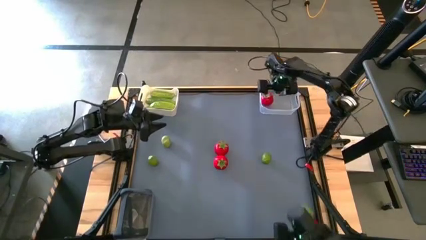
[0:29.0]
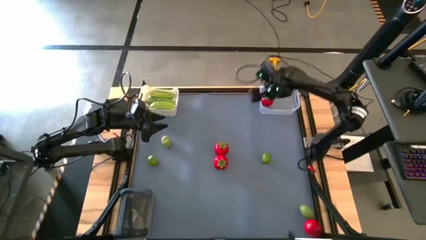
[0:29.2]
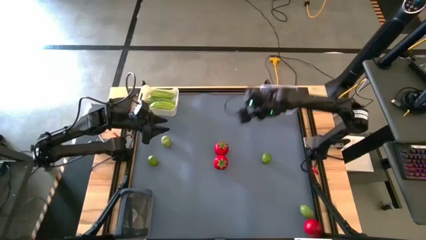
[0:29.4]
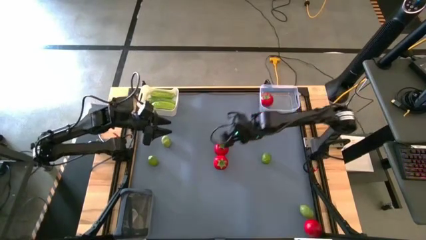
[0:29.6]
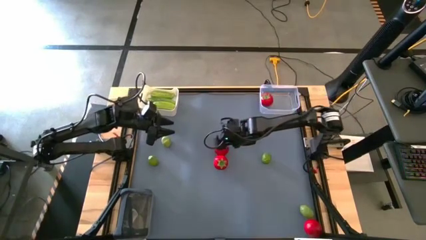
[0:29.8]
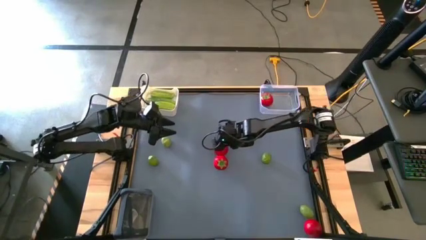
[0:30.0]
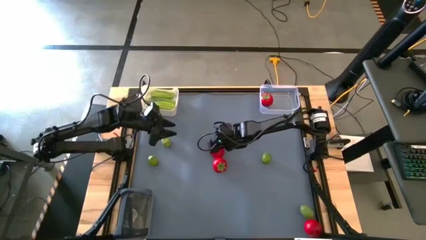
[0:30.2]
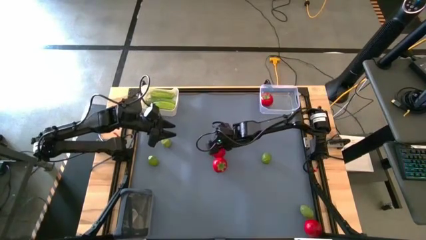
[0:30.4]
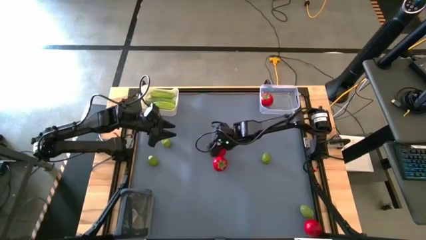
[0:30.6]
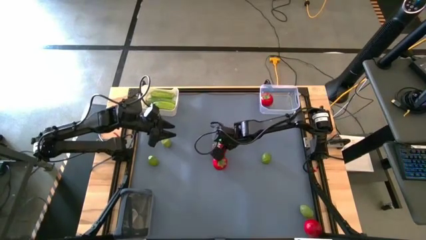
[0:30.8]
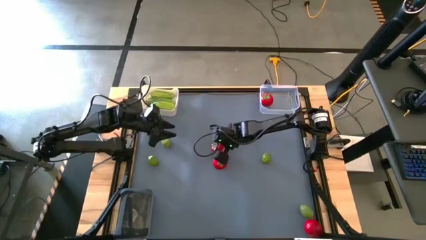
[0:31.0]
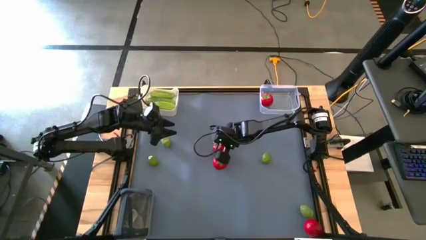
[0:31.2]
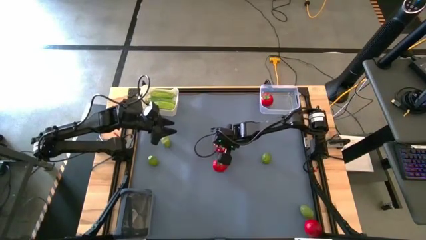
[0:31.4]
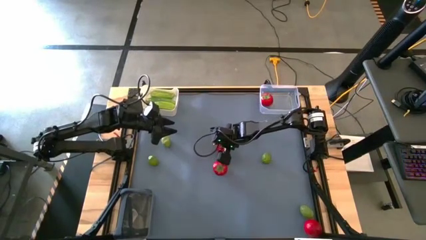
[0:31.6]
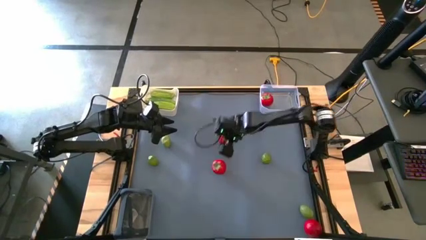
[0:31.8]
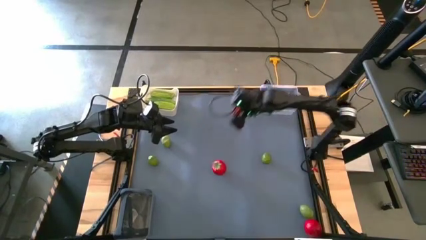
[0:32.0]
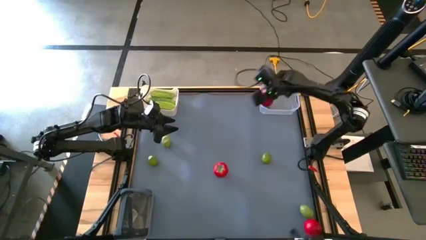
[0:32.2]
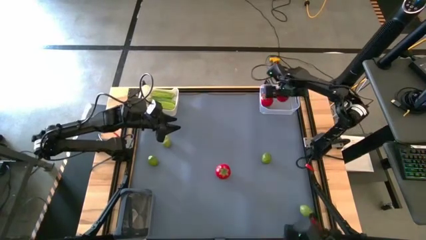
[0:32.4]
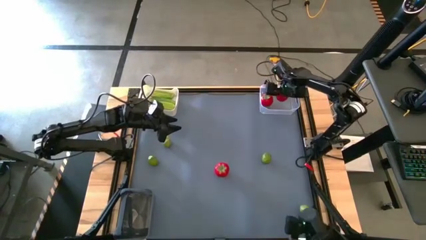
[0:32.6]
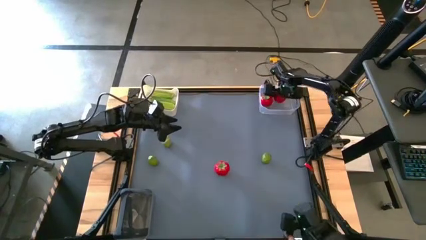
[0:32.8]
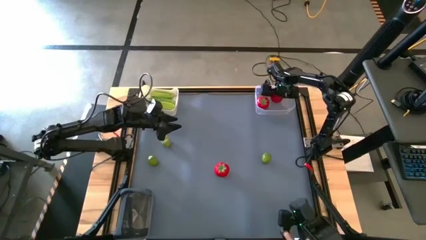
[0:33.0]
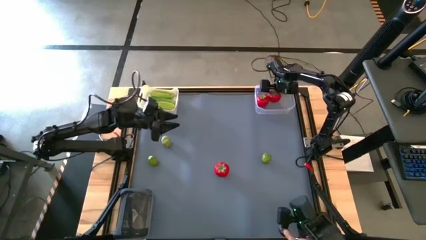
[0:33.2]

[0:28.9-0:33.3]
Task: Sort produce into baskets
Put the top left tomato into the transparent bin

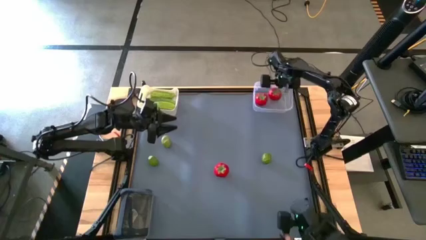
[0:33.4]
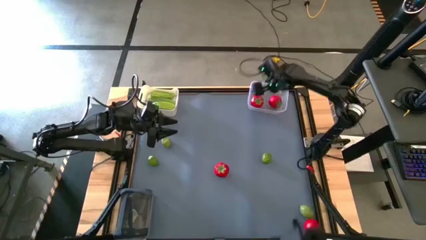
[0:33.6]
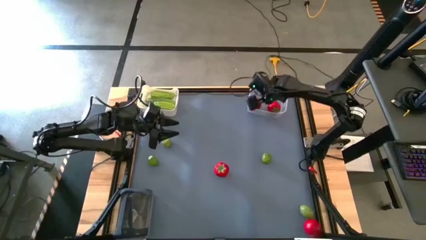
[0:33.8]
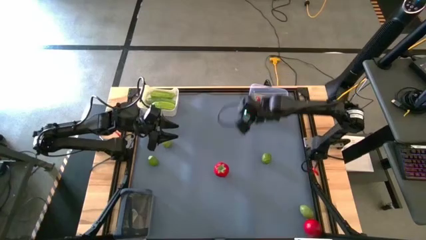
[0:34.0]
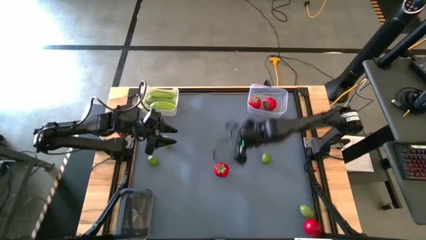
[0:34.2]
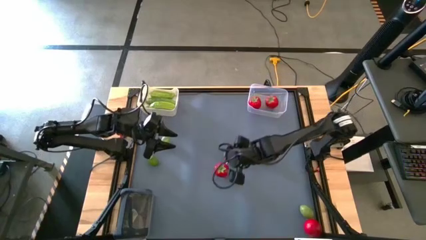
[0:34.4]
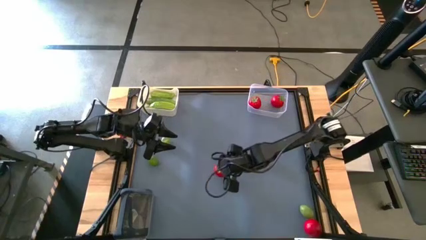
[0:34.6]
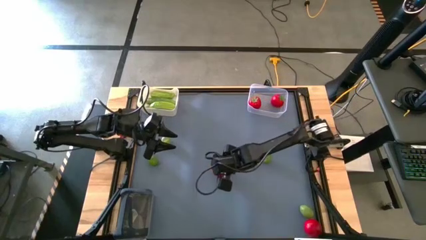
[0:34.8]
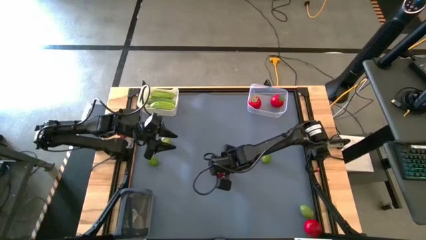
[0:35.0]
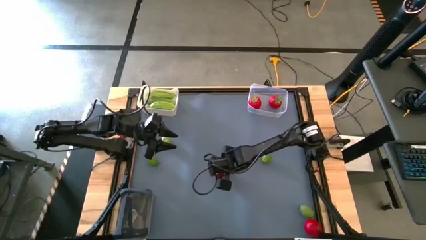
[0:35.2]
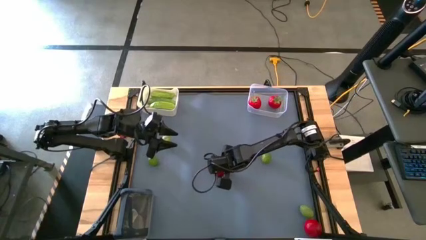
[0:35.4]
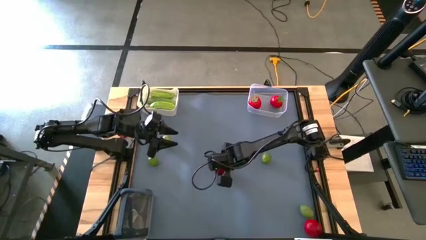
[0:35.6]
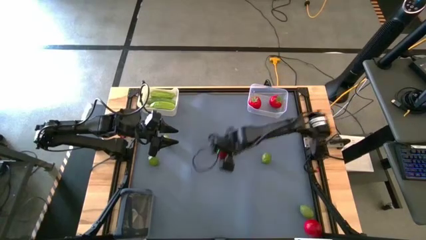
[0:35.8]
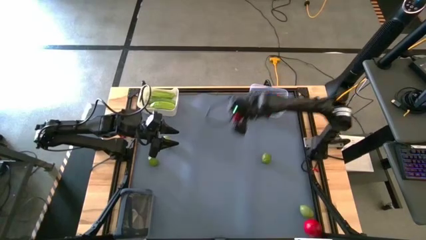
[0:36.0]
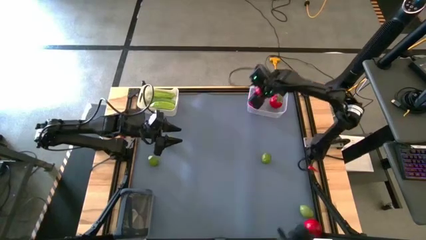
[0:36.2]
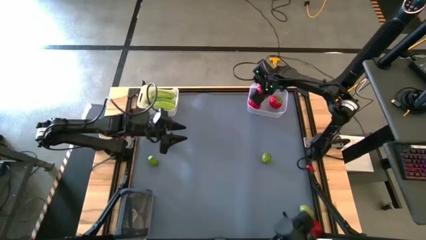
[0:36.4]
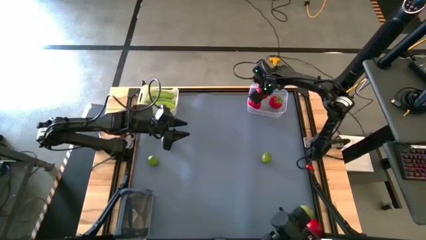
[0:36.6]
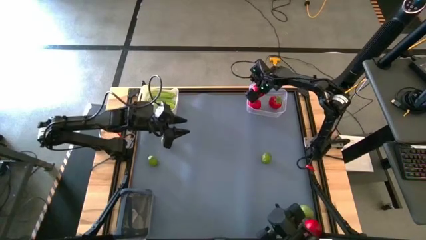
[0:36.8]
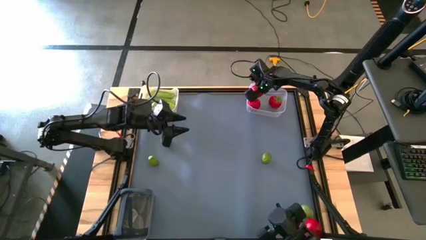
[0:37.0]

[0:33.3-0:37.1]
Put the top tomato into the transparent bin

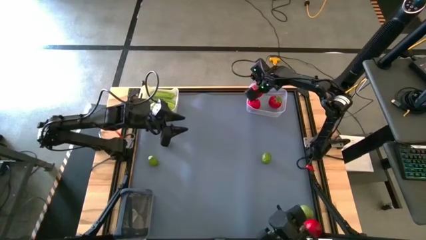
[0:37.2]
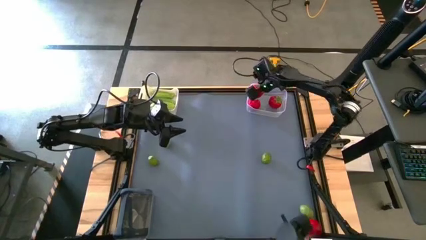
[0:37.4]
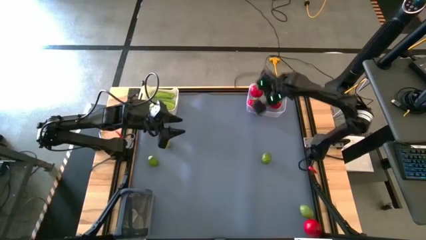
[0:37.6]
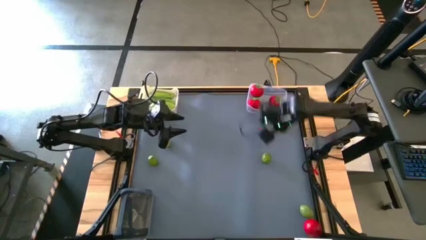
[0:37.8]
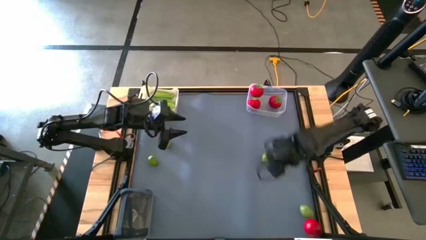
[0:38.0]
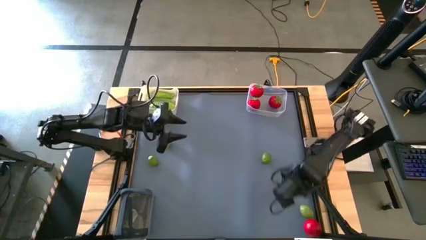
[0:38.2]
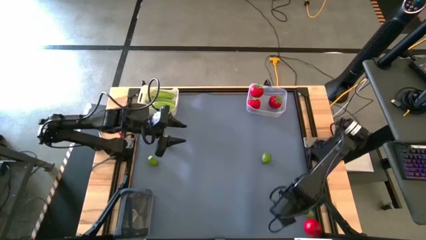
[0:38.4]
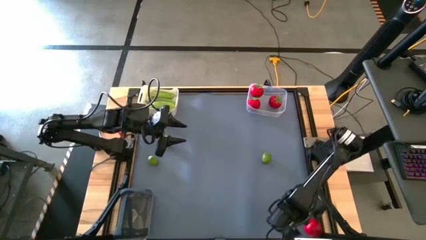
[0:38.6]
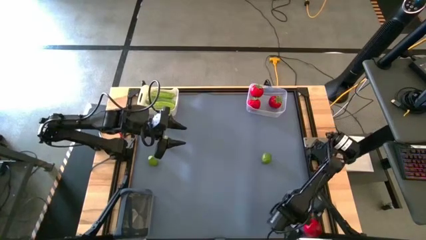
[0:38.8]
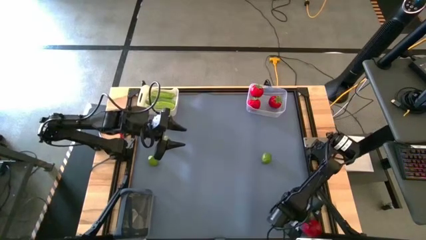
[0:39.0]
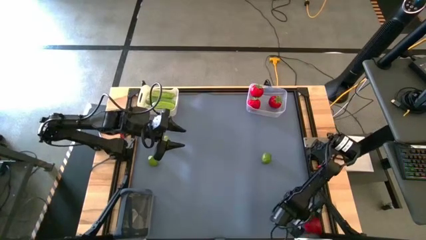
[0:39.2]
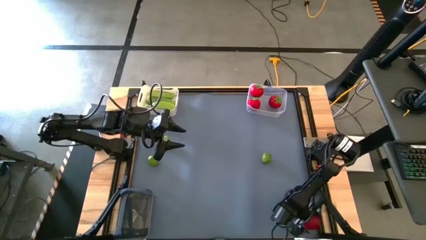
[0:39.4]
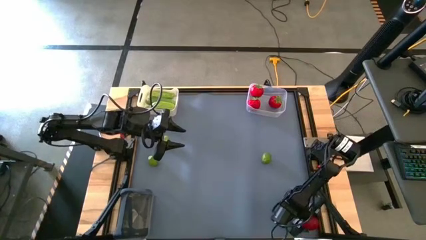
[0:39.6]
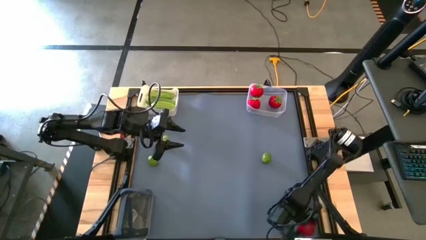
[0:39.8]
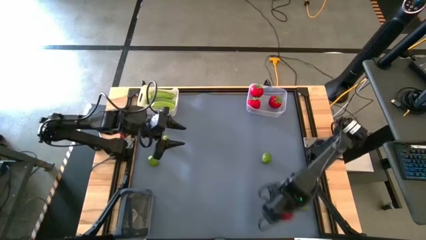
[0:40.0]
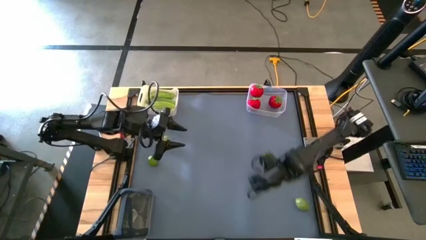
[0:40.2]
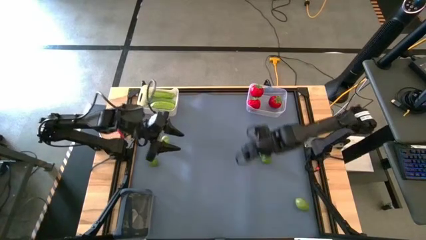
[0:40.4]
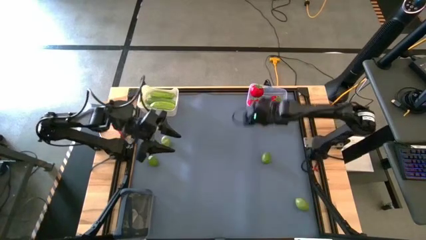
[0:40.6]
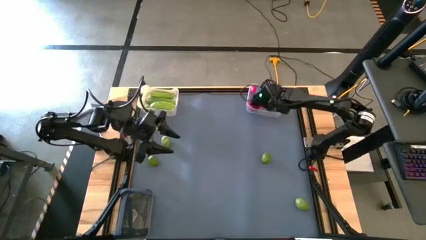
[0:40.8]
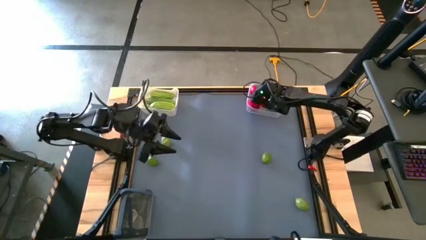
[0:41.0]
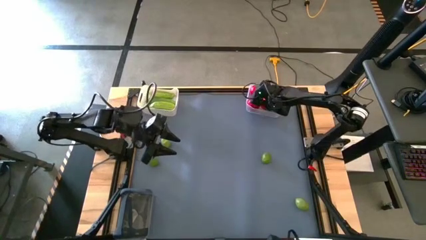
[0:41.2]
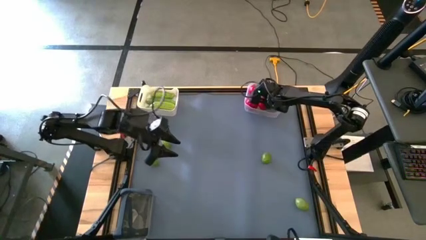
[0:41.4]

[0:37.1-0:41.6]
Put the tomato into the transparent bin

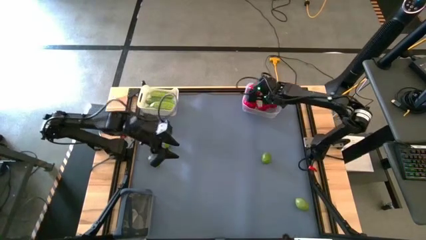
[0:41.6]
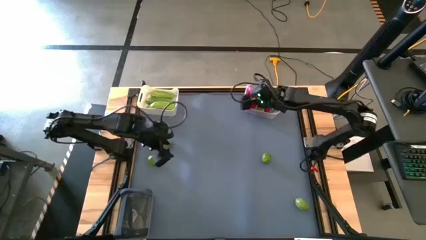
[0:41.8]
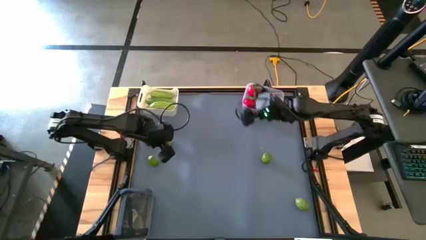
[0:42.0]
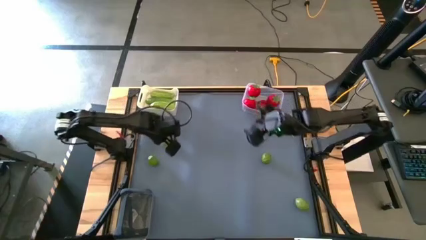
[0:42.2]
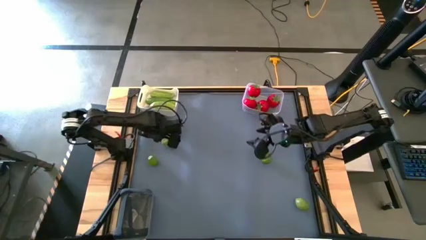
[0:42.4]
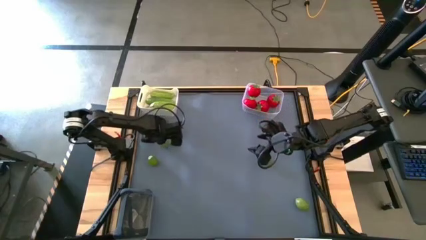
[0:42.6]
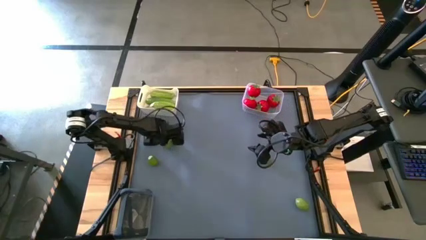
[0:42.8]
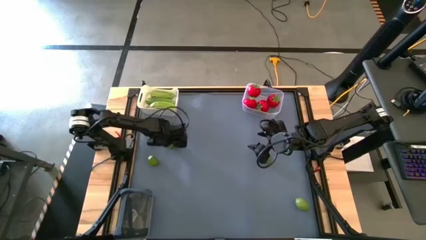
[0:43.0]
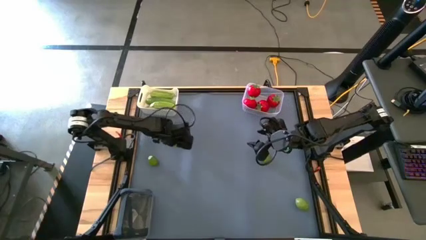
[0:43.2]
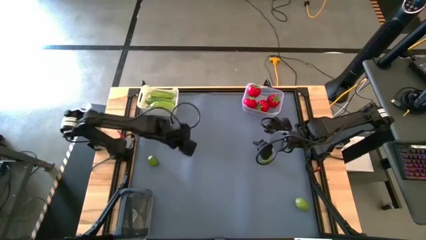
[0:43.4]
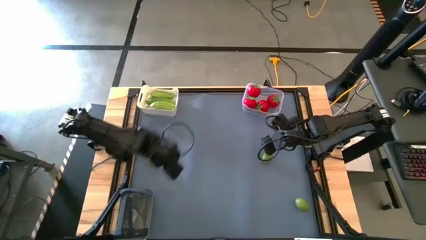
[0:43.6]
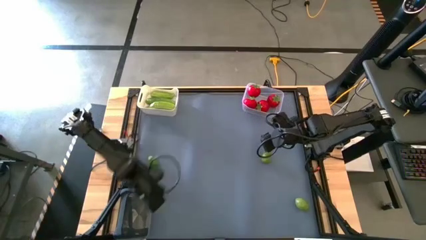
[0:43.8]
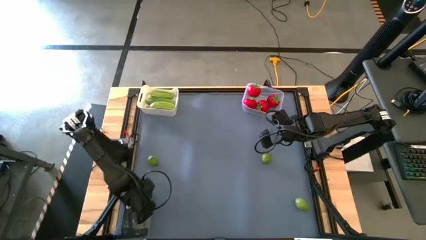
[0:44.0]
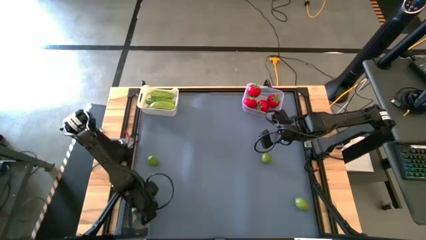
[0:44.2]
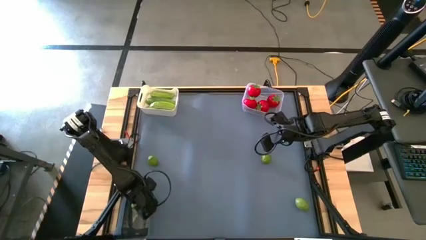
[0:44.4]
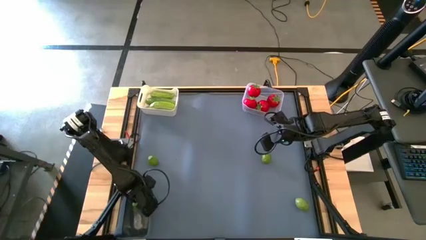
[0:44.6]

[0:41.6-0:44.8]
Put the top left lime into the black bin

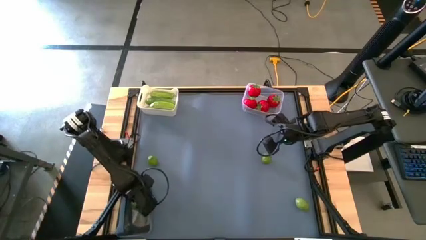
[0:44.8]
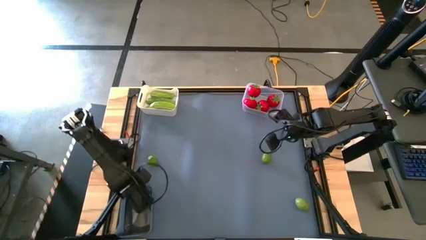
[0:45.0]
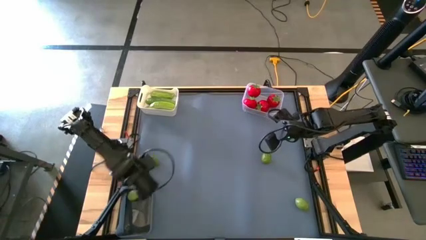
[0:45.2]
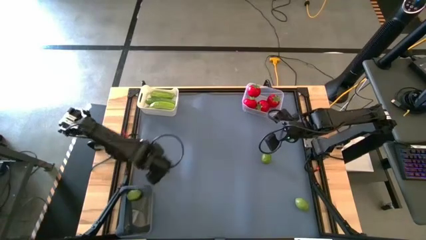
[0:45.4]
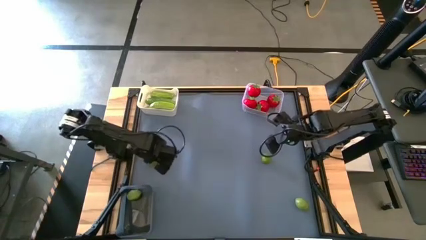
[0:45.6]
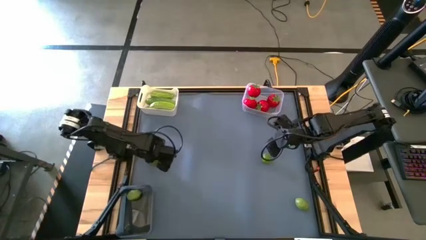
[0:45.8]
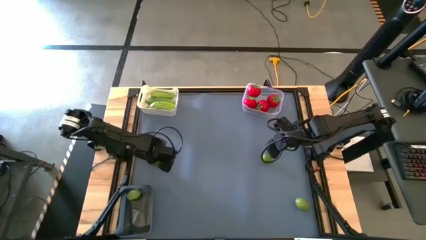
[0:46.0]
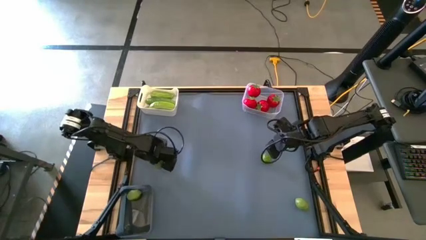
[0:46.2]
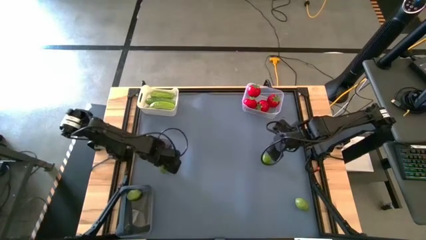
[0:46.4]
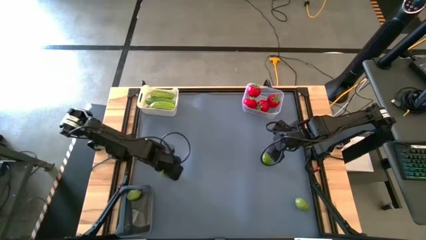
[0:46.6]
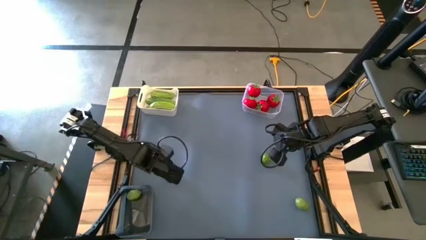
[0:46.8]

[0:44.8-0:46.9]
Put the left lime into the black bin
